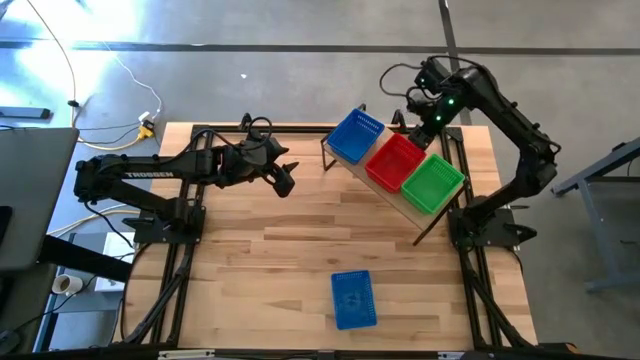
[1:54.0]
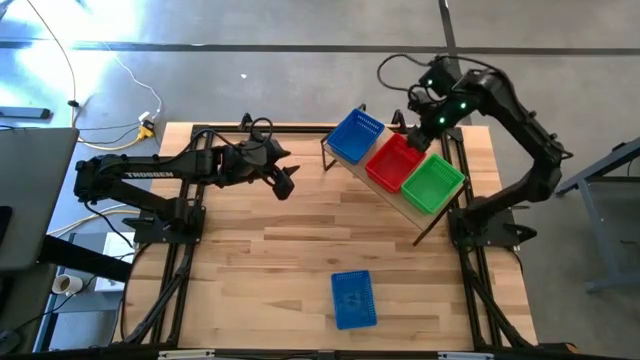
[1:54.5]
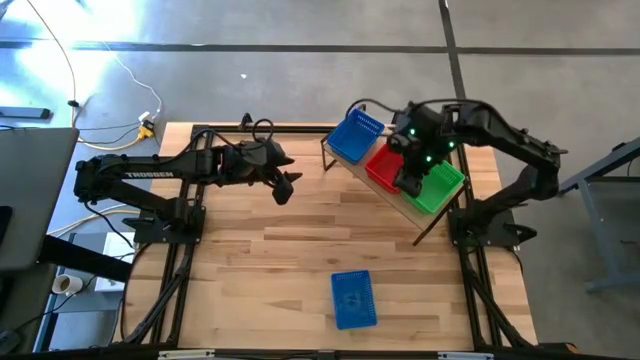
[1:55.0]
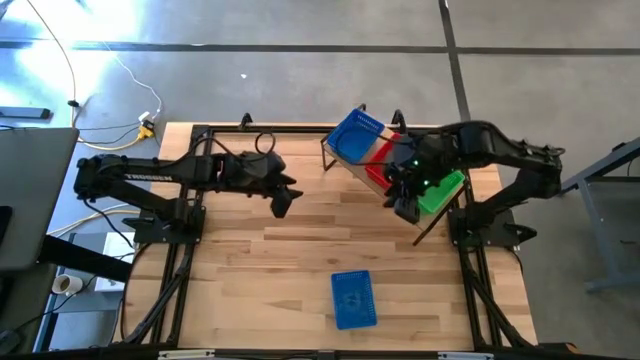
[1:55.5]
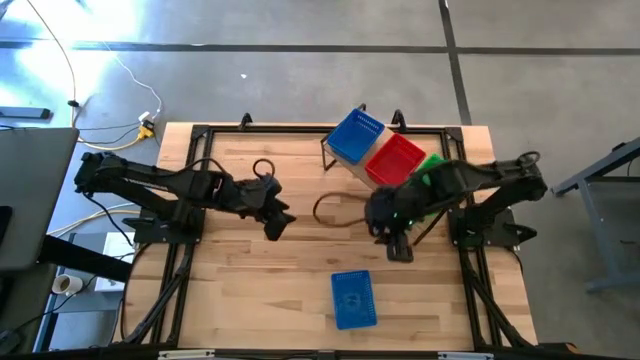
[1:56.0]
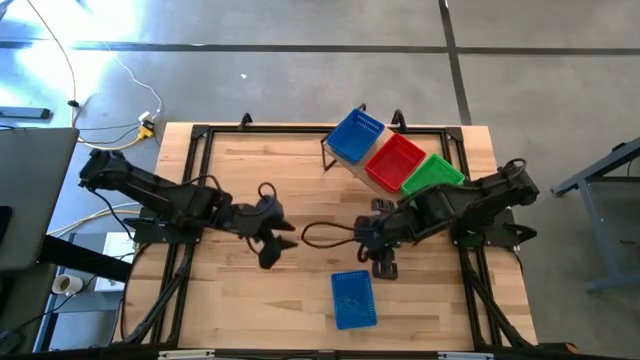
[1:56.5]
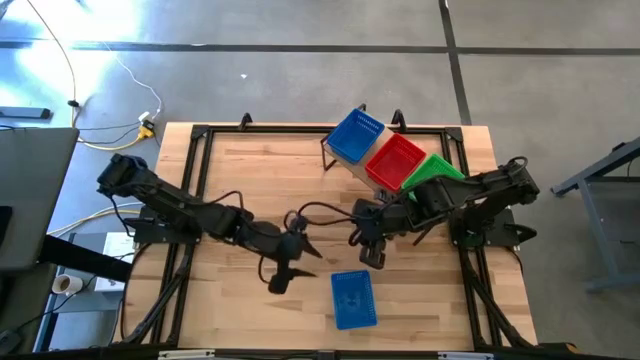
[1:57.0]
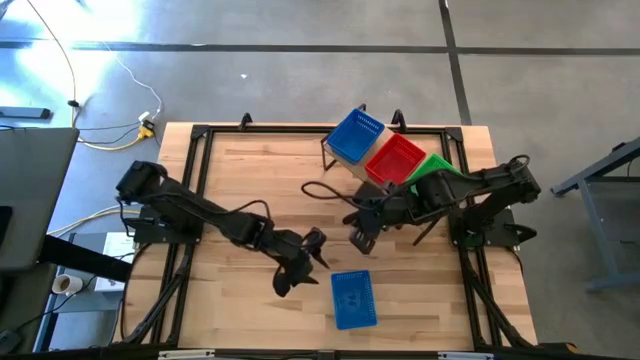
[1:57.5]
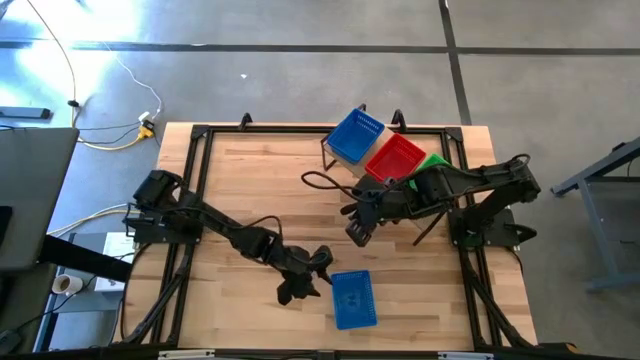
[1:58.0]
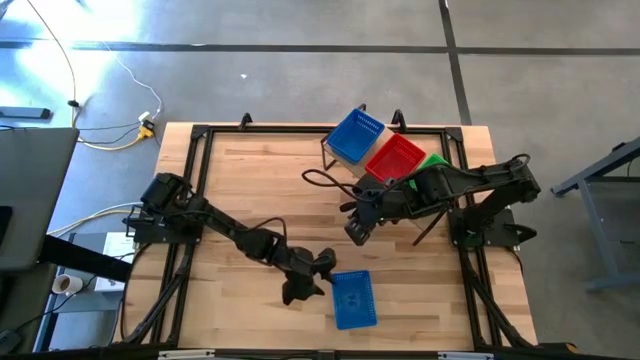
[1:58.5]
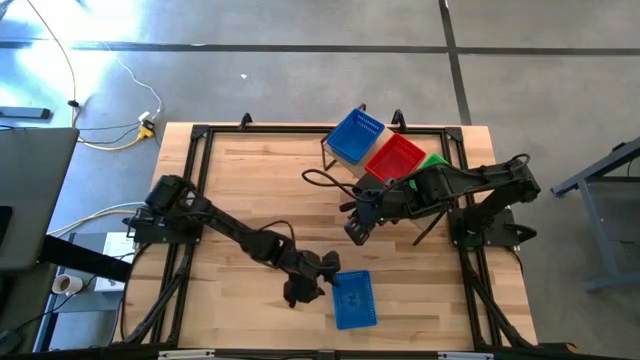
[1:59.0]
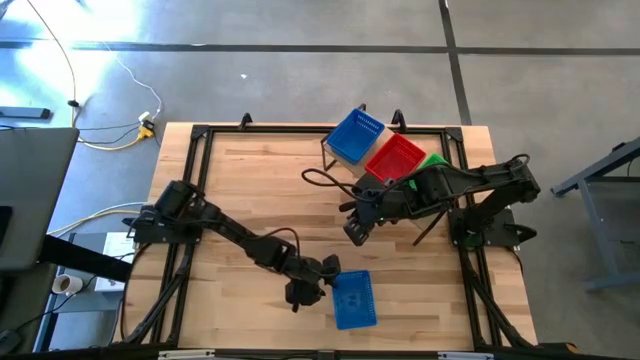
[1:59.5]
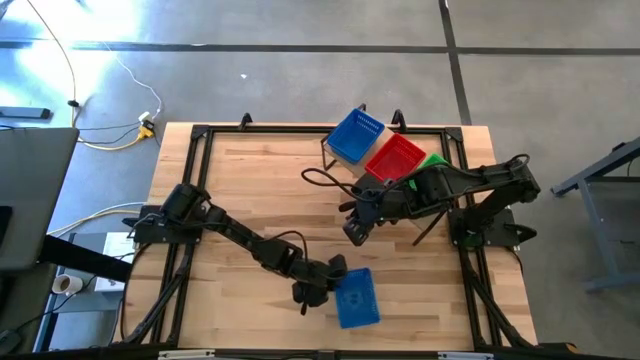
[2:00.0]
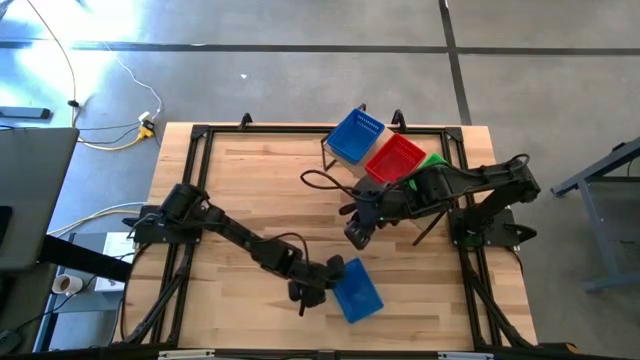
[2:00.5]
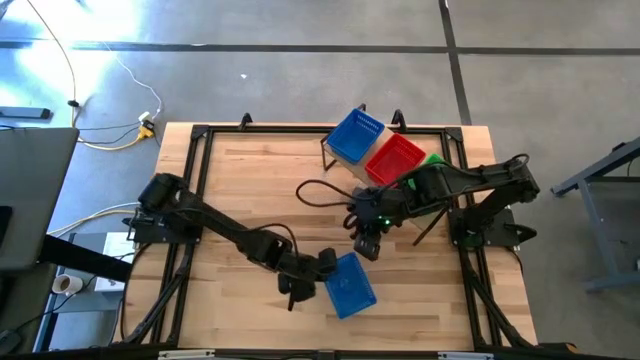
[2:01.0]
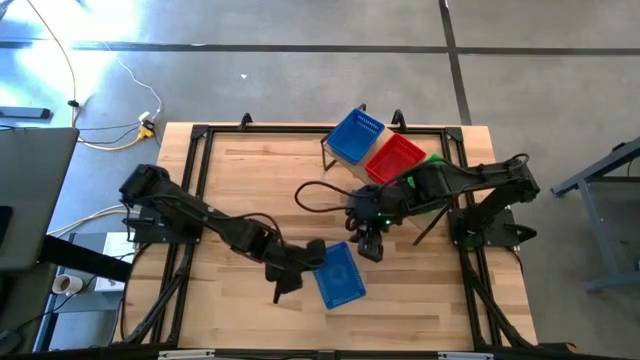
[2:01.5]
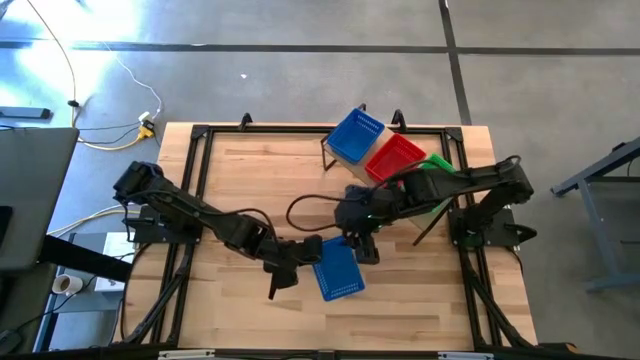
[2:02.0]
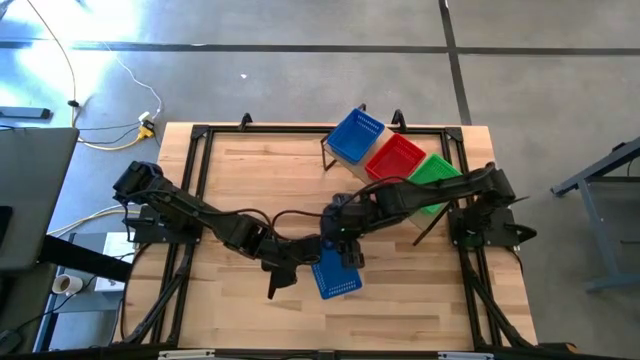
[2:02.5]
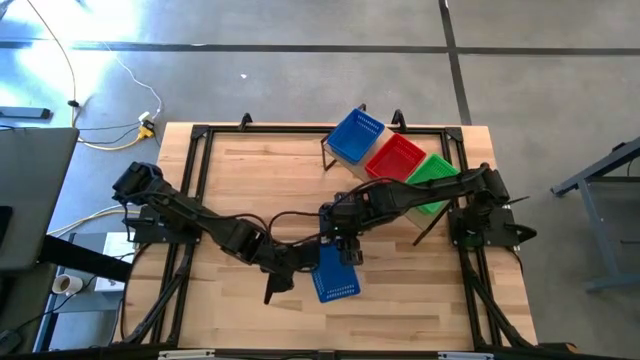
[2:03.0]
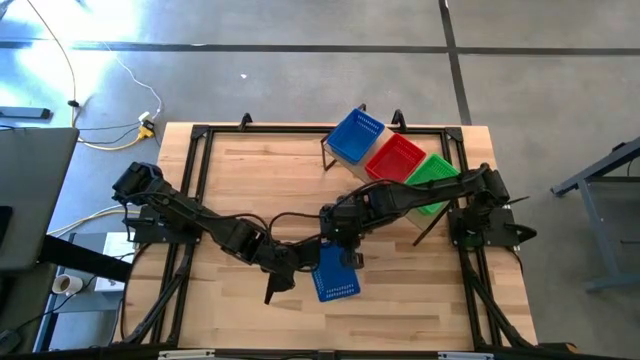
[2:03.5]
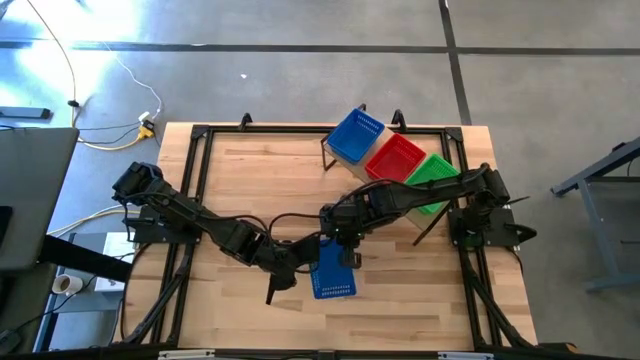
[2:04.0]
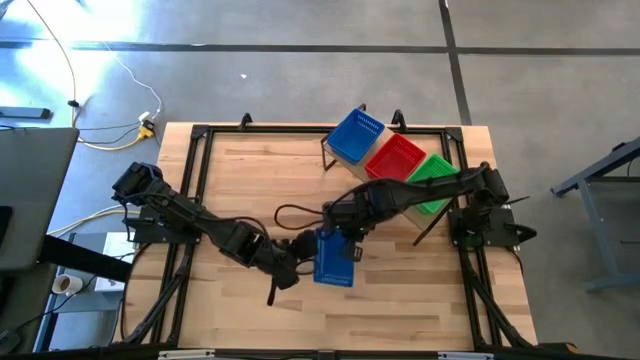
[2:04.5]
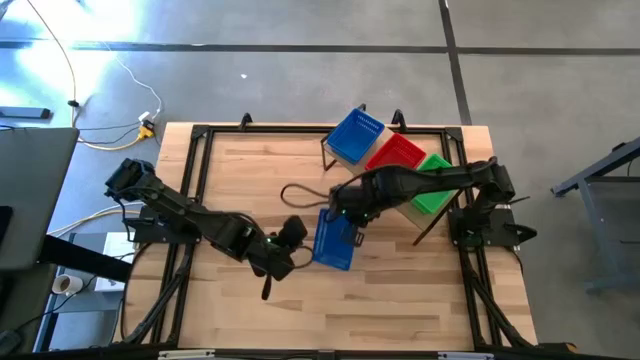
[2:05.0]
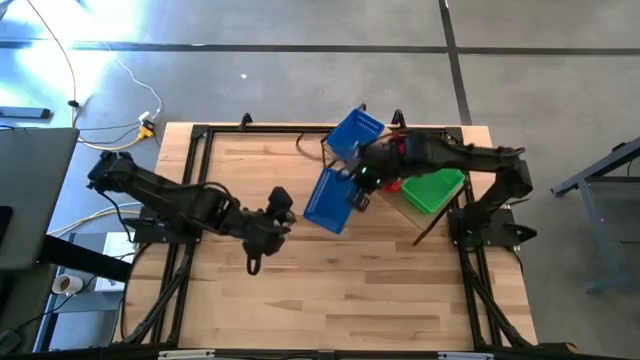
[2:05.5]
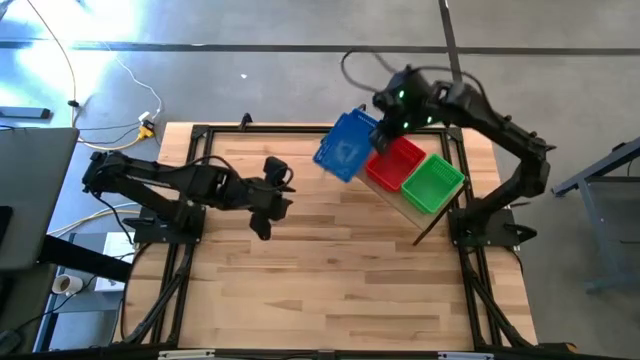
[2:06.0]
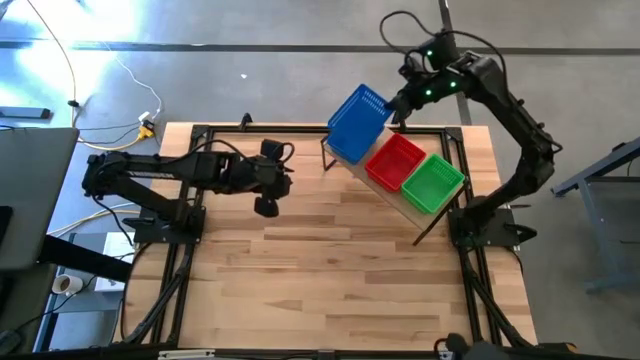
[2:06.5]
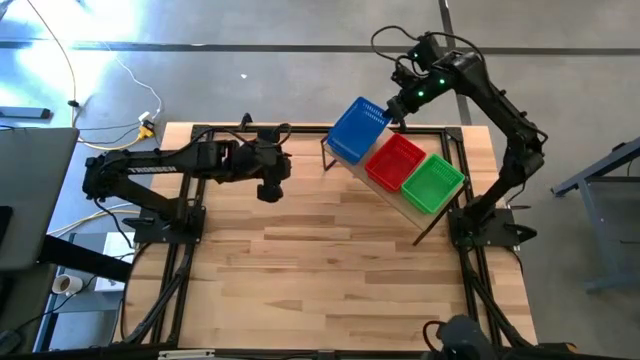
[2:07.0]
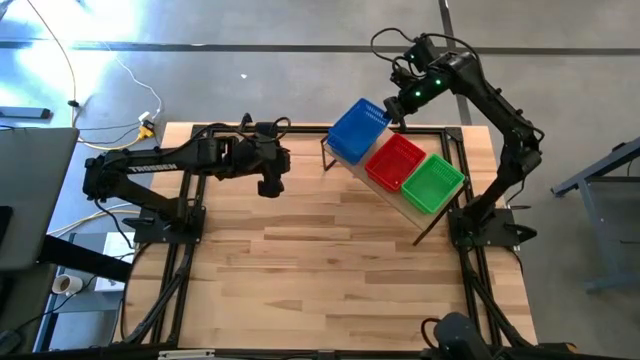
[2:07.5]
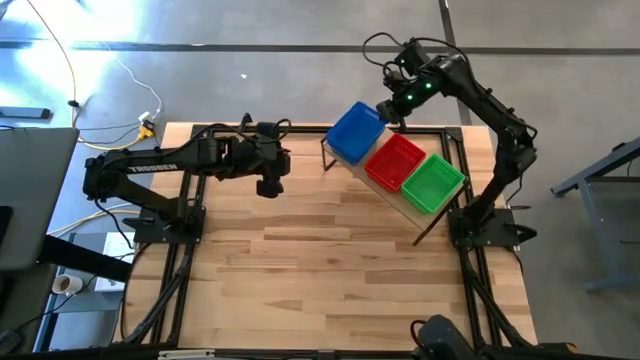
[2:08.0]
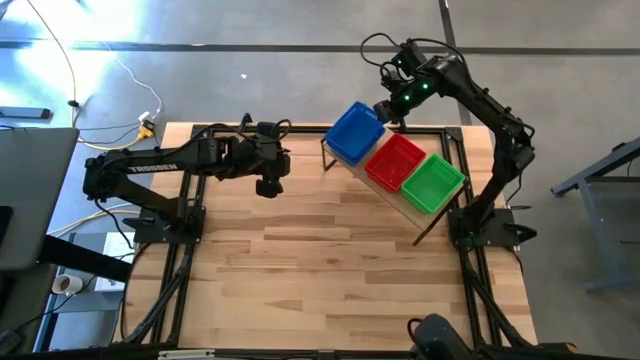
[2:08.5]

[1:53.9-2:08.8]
Task: Stack baskets on shelf by color
Stack the blue basket on the stacked blue basket on the shelf

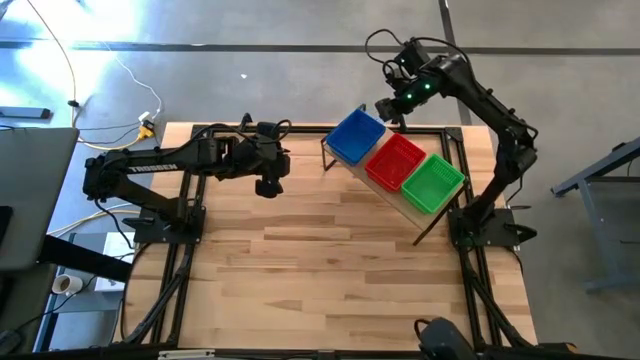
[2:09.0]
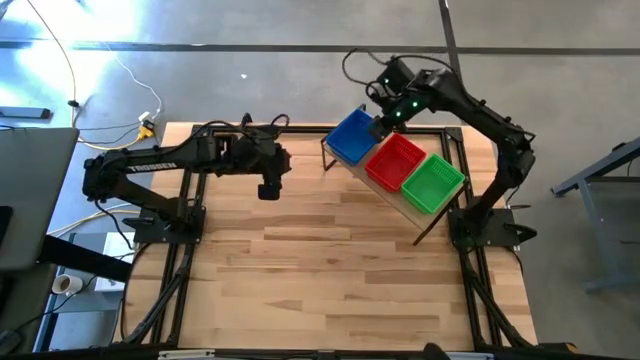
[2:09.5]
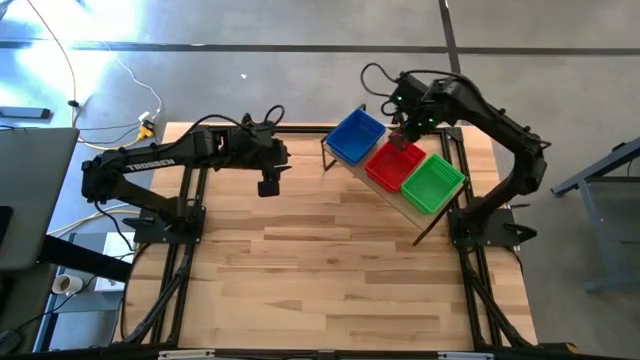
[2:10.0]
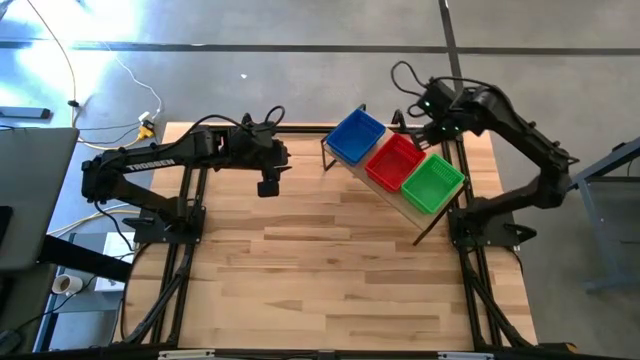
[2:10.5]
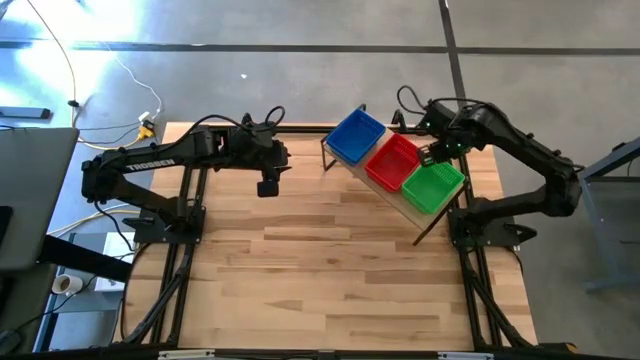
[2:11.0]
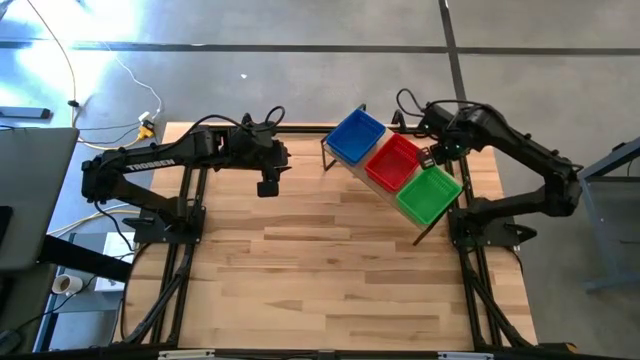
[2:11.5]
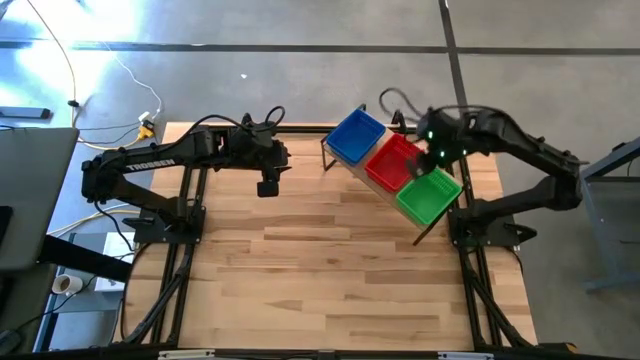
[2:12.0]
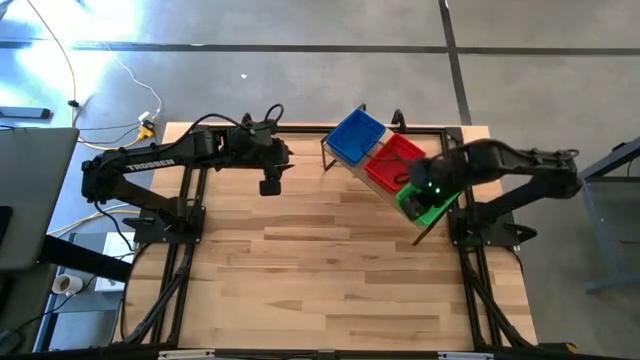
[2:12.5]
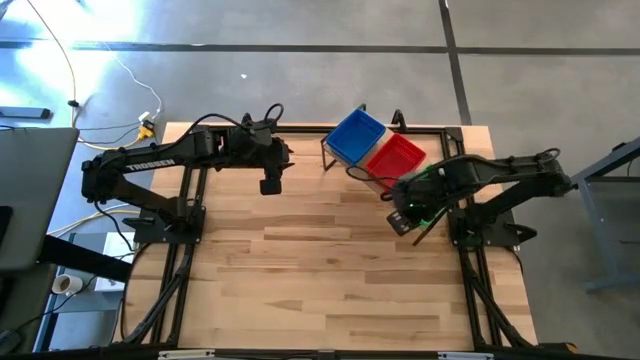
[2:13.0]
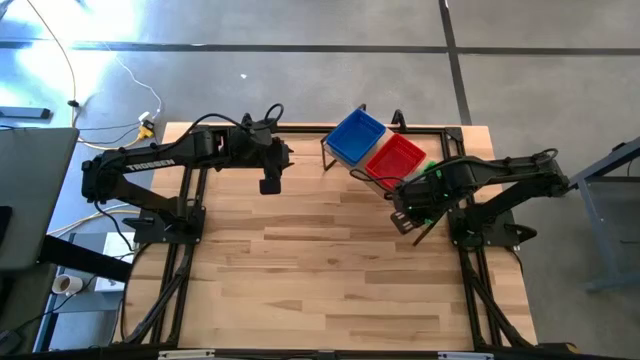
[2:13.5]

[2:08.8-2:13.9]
Adjust the green baskets on the shelf

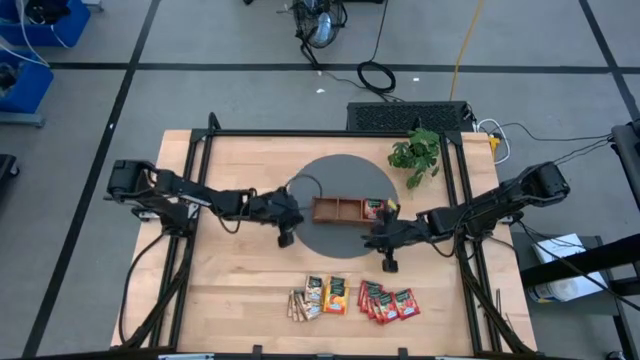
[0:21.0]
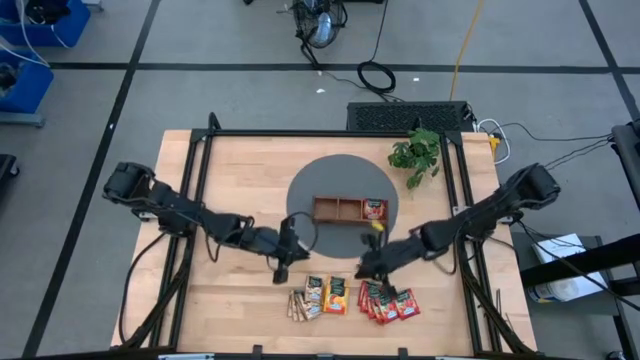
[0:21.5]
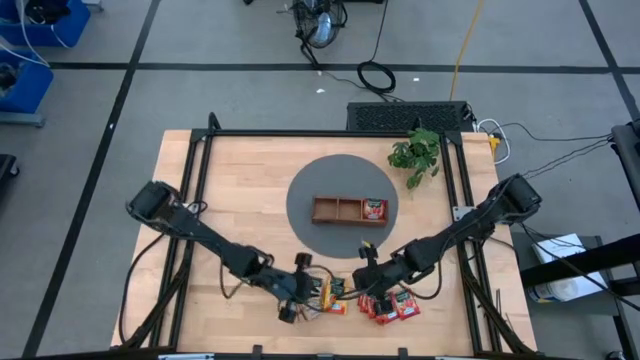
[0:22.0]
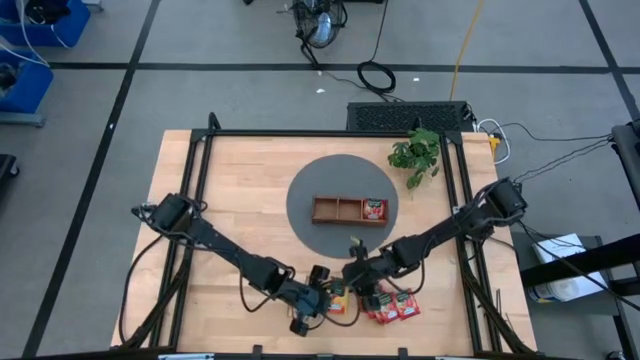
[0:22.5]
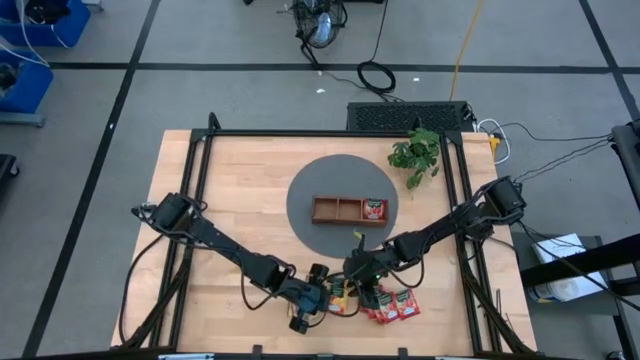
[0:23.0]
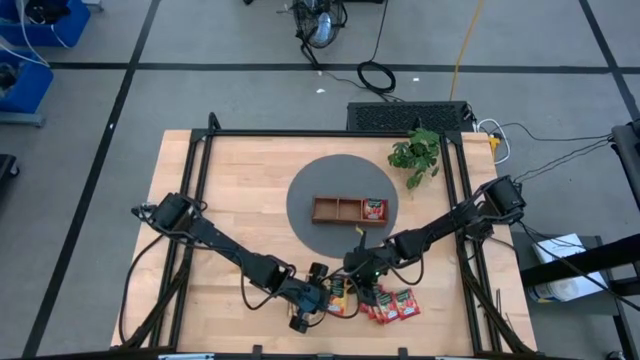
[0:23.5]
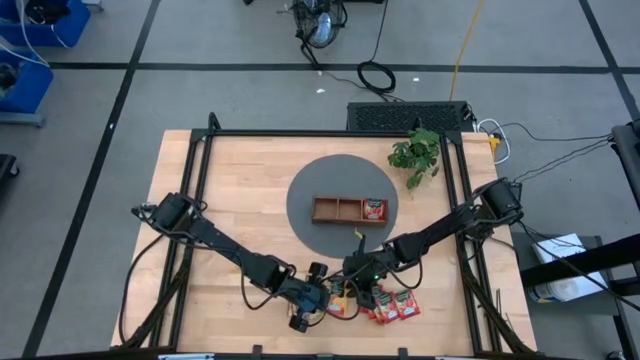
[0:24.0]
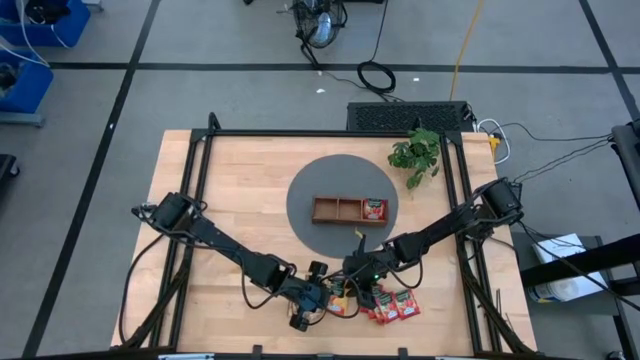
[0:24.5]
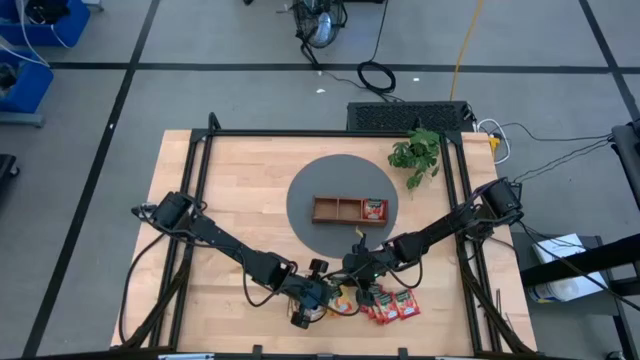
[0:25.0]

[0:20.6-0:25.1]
Task: Pick & Place Tea
Put the yellow tea bag to the middle section into the wooden organizer
